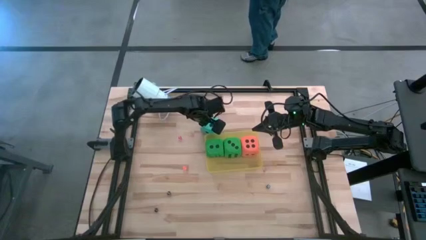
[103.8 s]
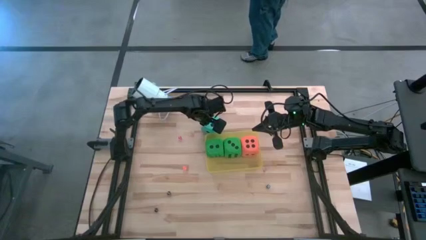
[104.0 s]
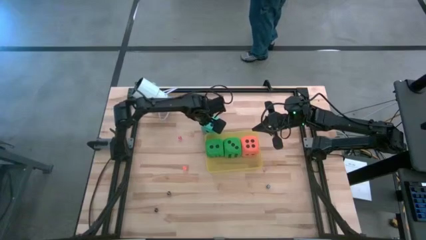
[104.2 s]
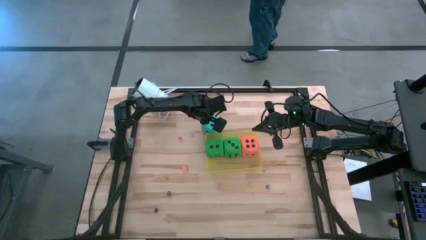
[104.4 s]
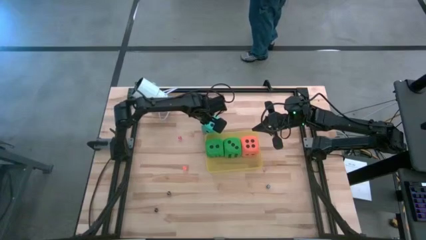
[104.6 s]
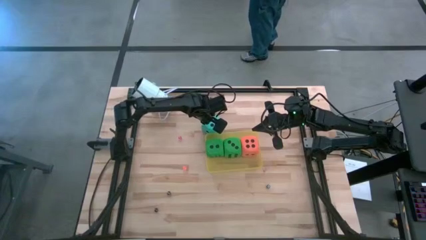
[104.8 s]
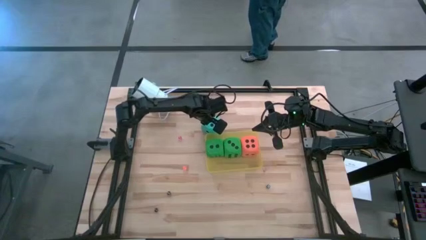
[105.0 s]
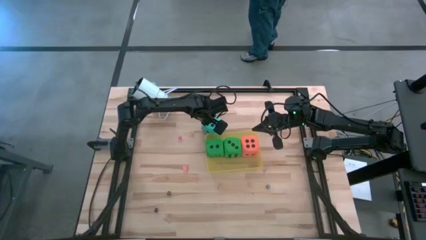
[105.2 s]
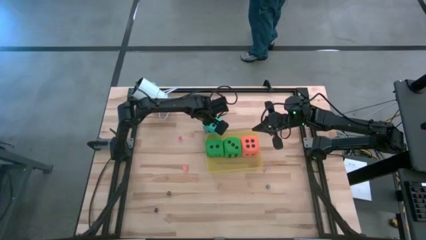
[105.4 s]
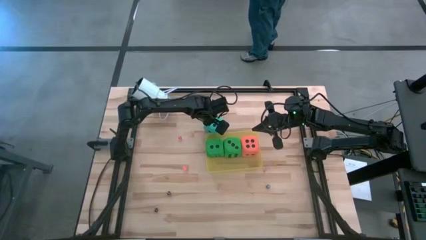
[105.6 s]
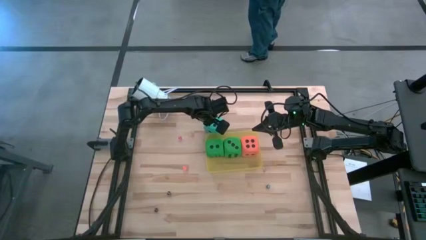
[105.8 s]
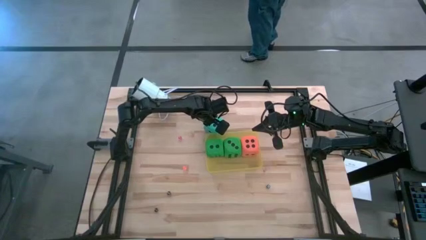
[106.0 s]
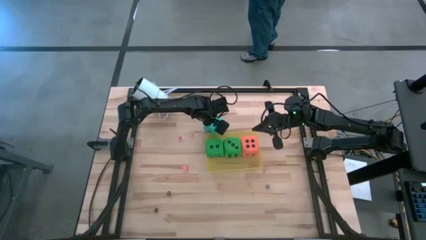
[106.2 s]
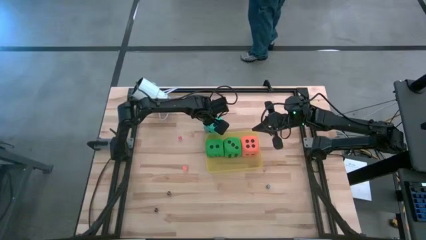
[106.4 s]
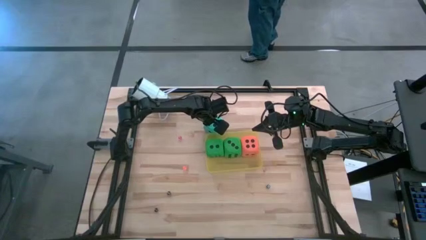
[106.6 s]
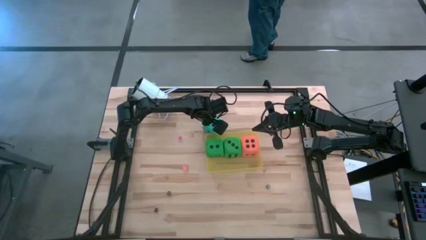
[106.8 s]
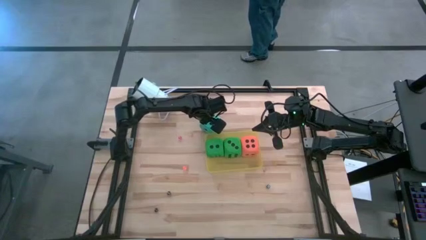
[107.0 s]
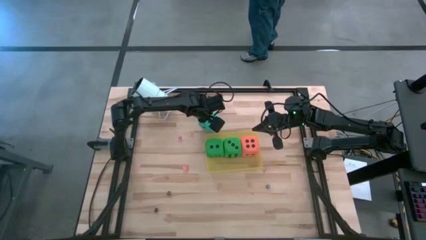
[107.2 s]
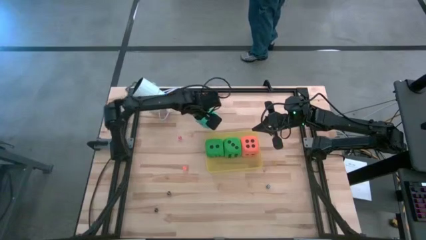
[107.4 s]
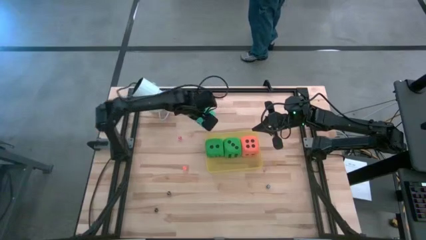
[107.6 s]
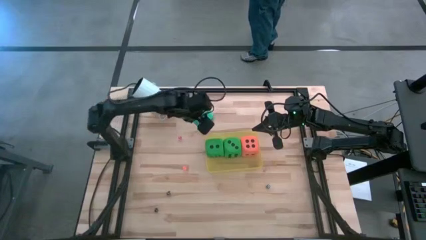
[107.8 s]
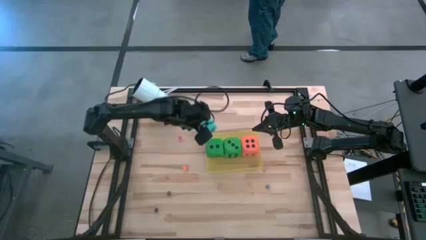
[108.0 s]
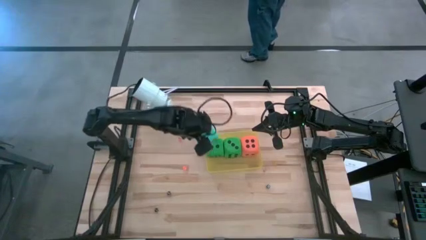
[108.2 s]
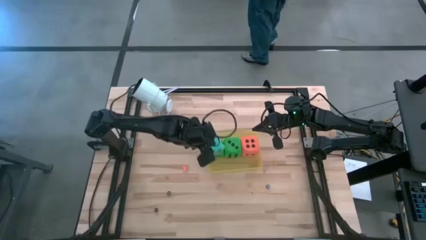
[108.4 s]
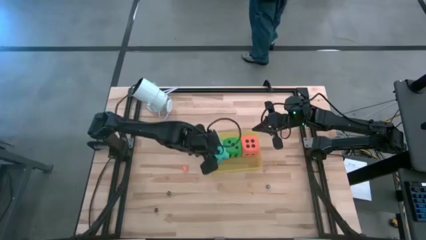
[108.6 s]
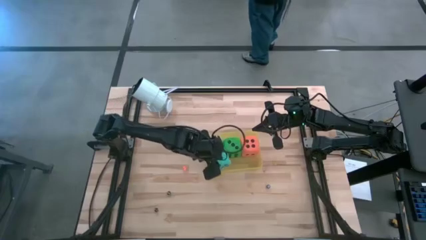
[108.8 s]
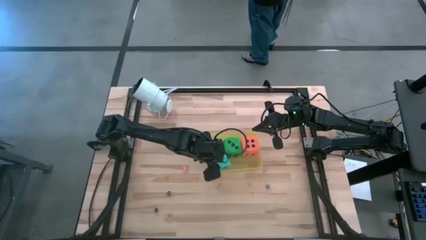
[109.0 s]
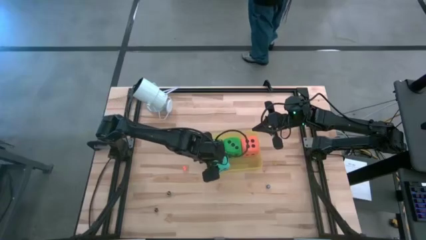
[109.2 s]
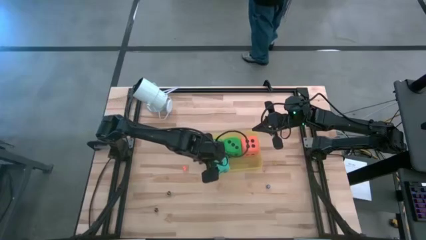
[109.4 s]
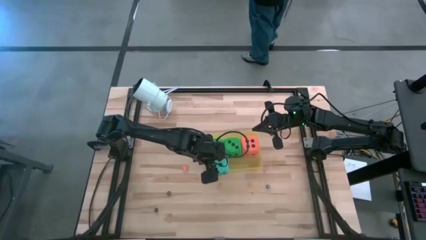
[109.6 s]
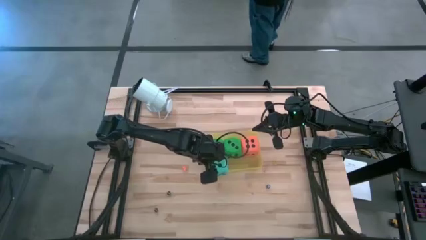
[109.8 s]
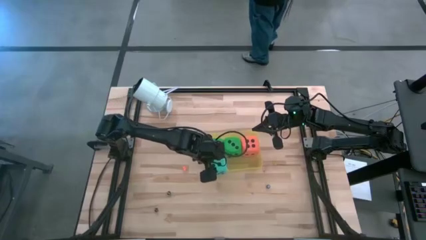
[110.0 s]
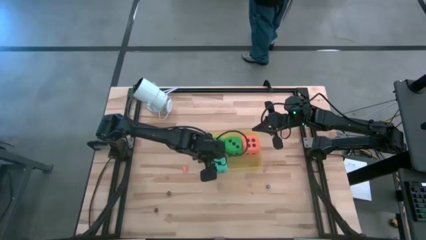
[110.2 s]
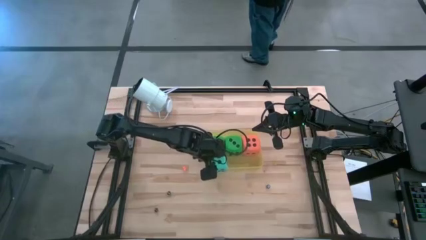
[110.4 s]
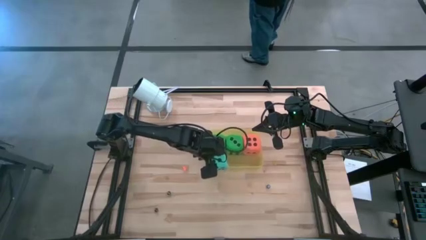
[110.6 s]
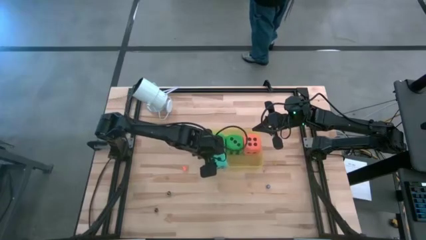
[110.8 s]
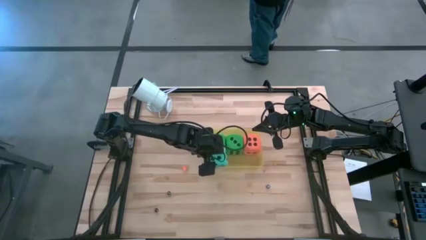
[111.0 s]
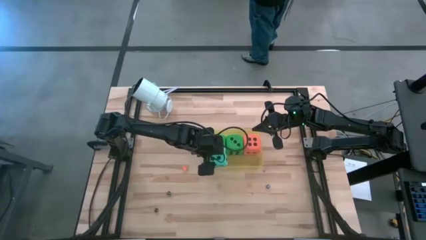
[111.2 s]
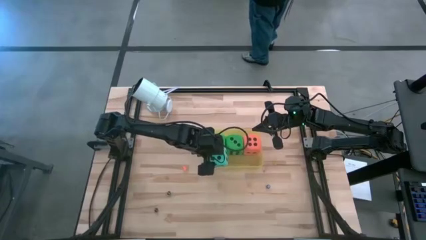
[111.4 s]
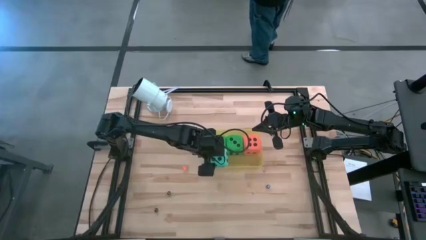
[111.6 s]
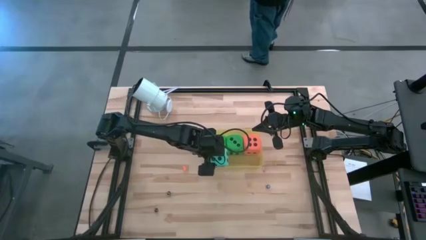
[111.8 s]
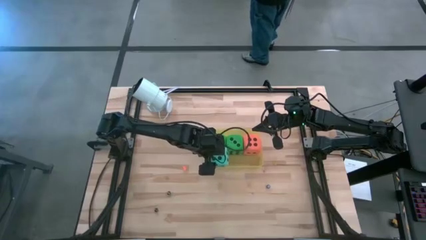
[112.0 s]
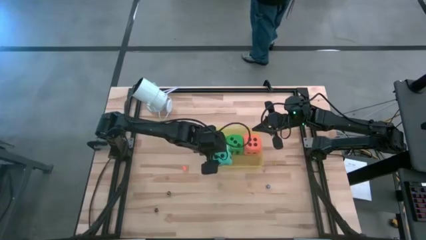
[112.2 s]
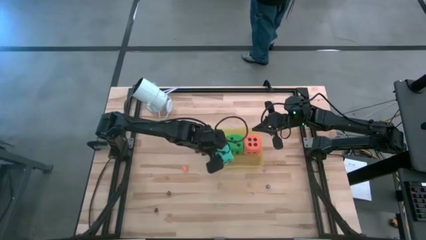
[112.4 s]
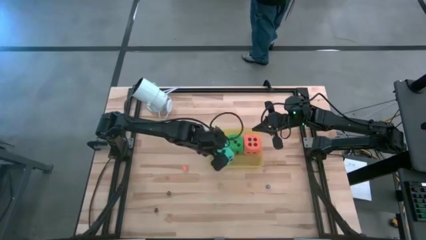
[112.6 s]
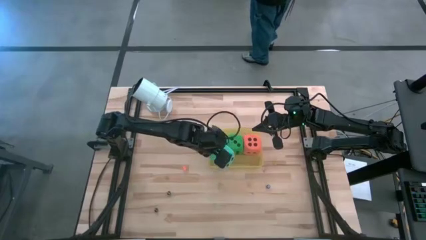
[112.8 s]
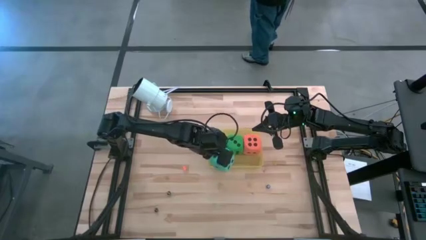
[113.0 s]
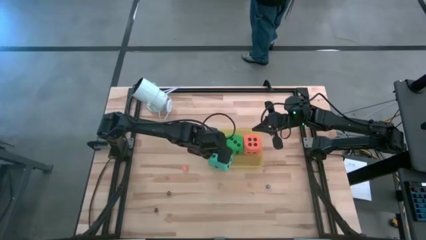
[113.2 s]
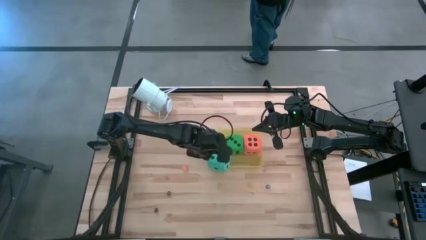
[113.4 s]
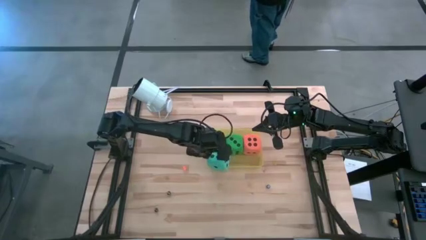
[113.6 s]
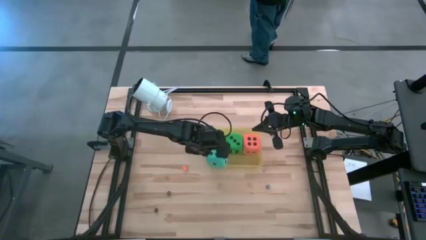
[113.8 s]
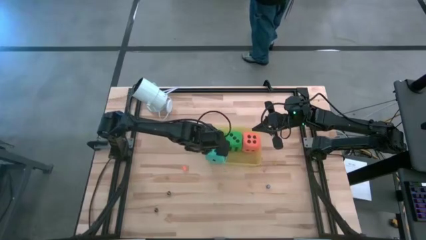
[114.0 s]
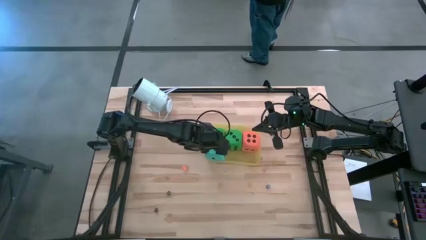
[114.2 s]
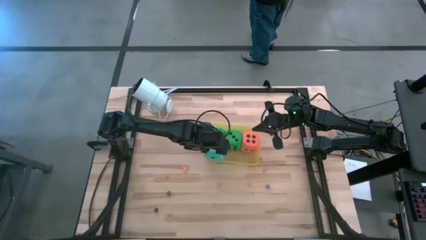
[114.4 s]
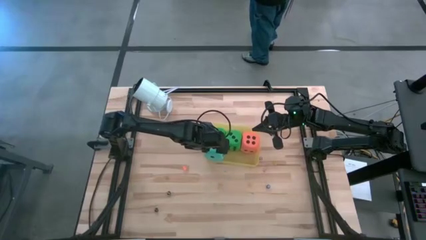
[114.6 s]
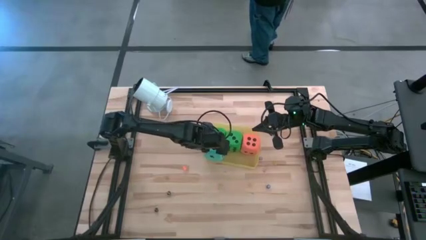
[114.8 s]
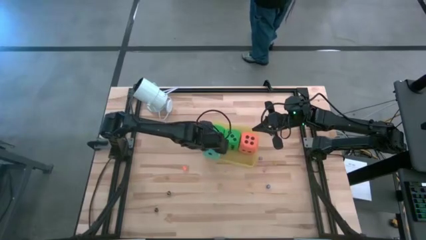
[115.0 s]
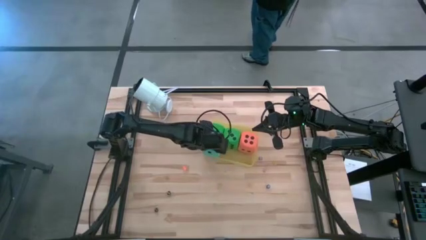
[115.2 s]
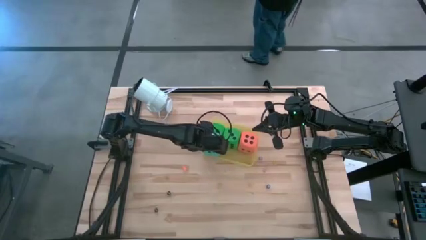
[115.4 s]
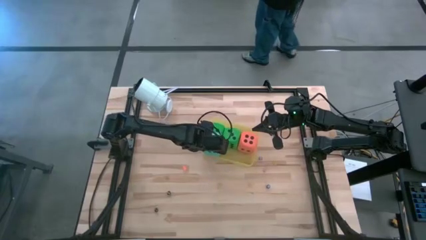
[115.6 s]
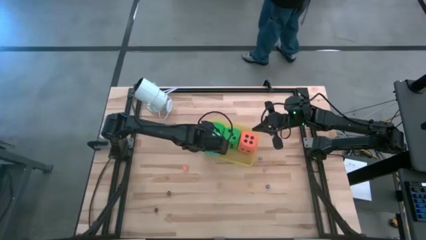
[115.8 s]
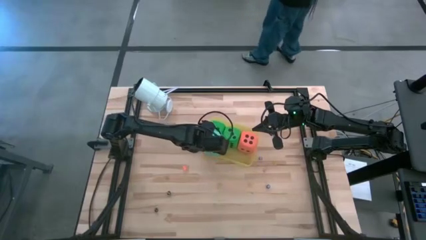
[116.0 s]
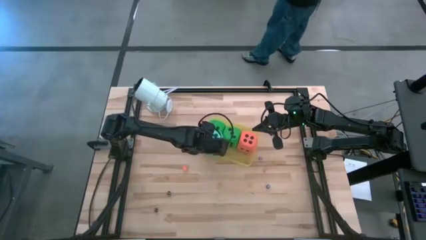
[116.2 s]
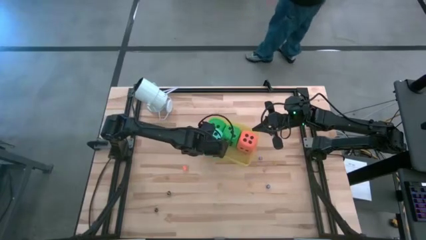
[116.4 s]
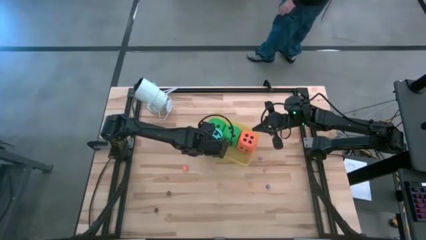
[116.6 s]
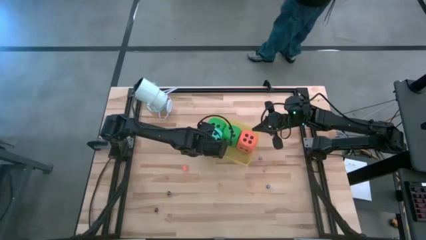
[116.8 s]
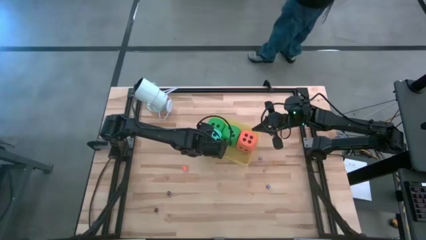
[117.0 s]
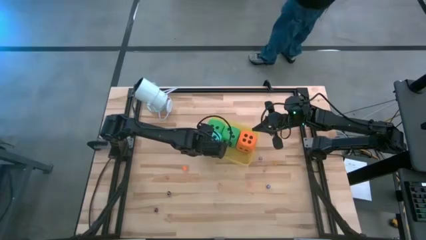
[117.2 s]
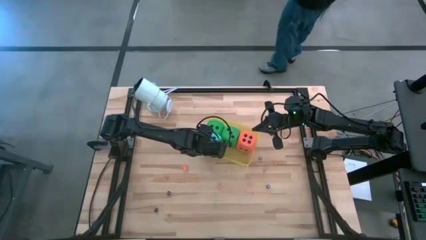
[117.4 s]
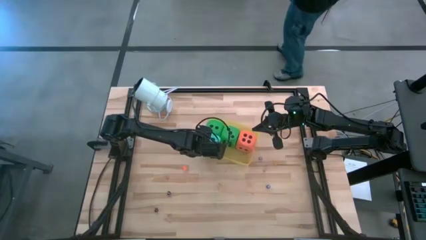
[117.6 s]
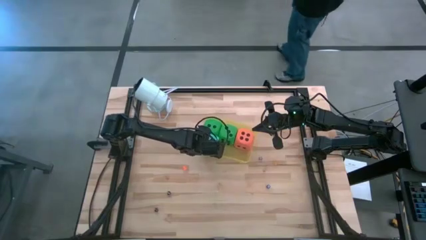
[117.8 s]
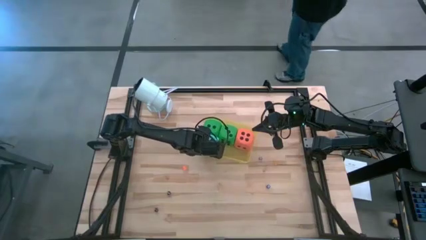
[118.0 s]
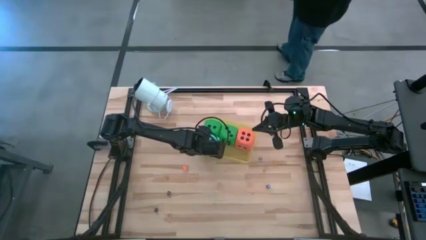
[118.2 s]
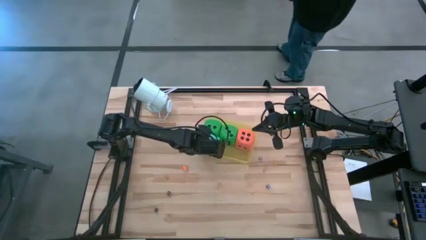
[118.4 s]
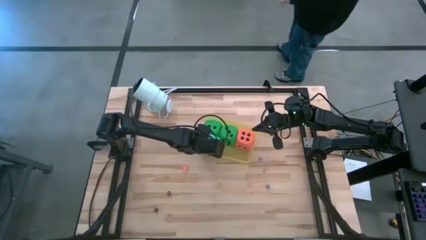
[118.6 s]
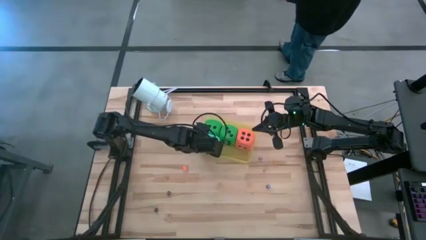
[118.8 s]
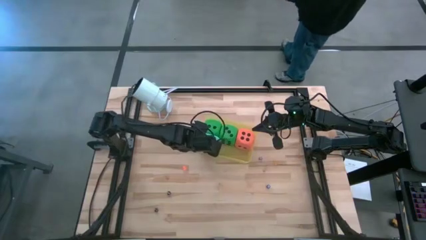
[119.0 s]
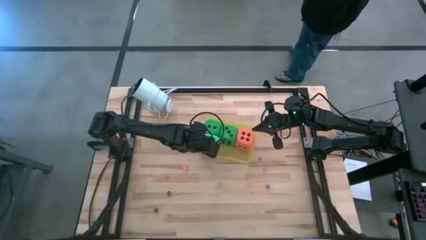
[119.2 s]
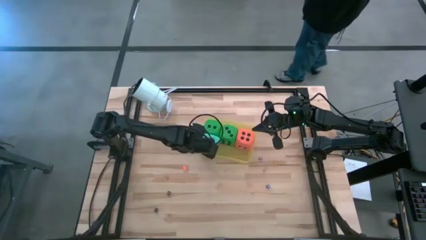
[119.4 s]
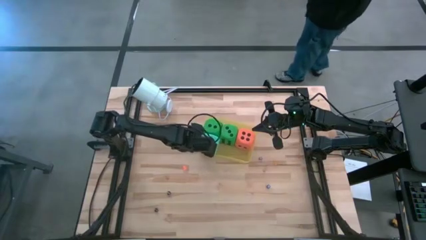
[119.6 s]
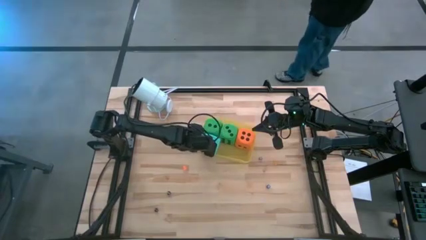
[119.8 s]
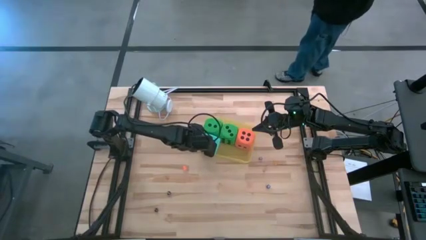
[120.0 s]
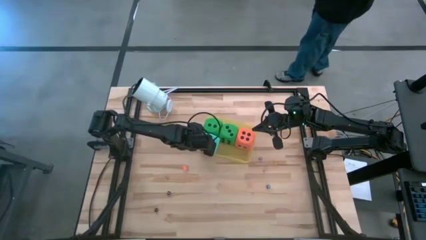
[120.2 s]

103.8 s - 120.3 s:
Task: Pick & Place Dice
Put the big light blue dice into the yellow bin
